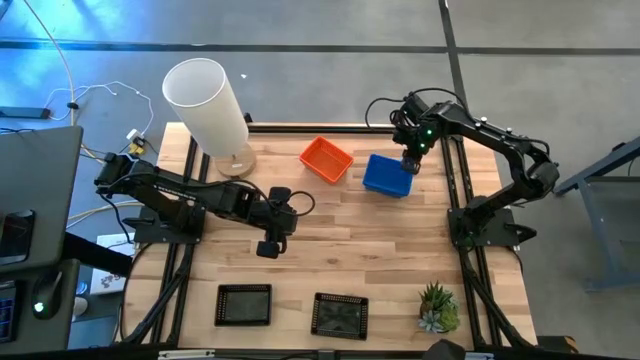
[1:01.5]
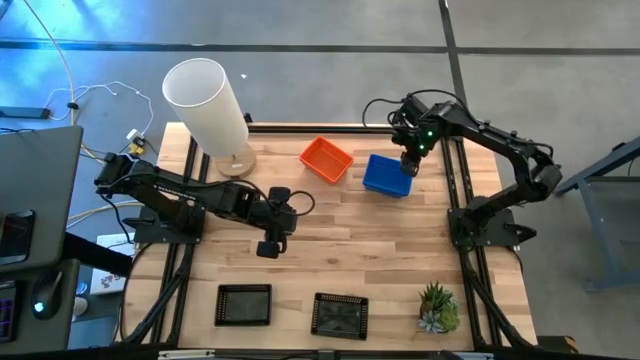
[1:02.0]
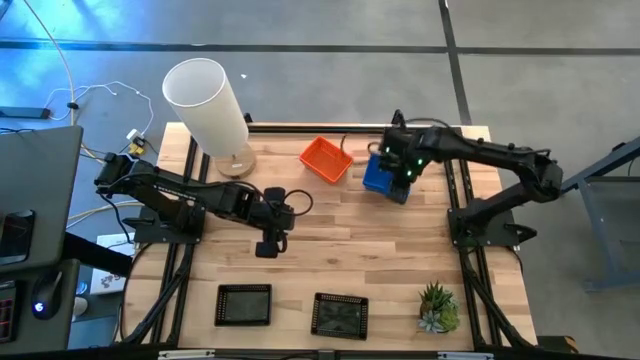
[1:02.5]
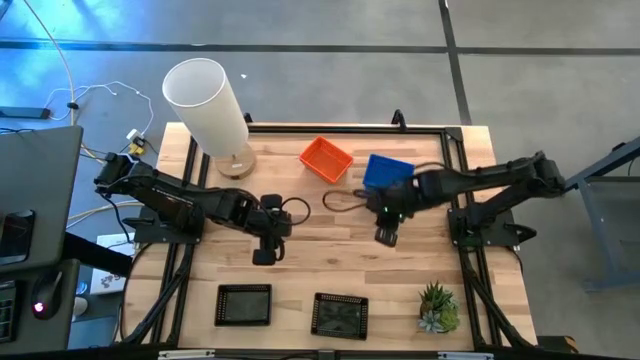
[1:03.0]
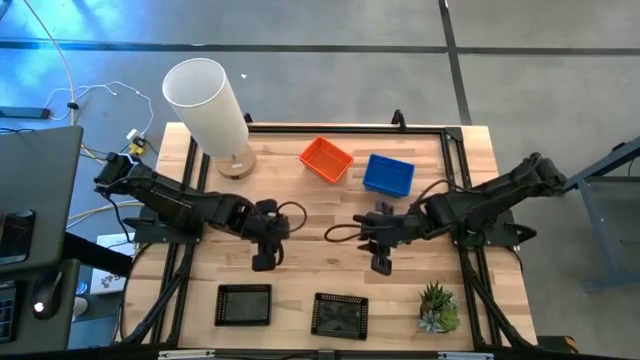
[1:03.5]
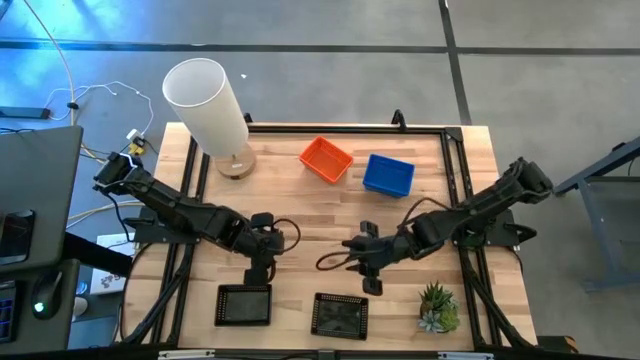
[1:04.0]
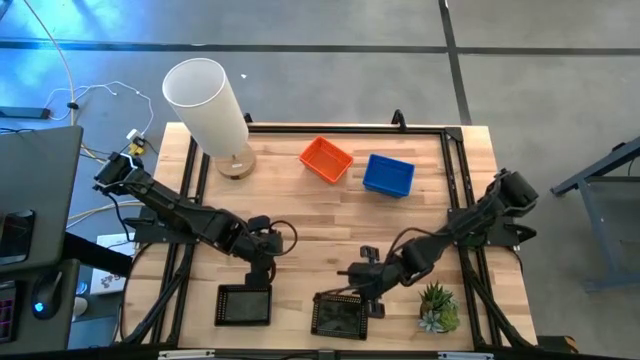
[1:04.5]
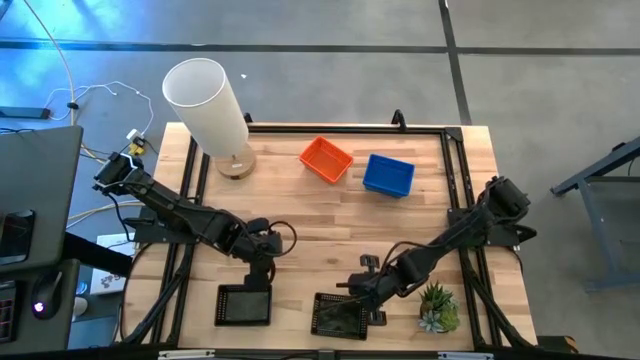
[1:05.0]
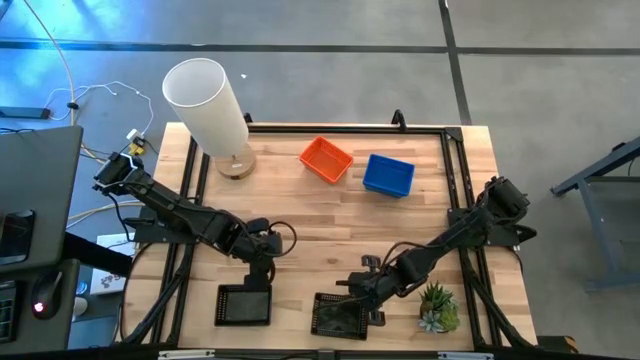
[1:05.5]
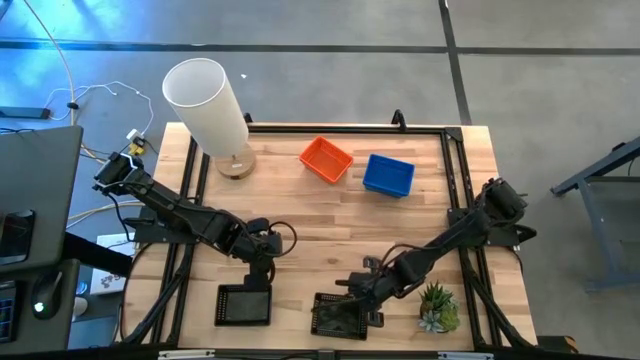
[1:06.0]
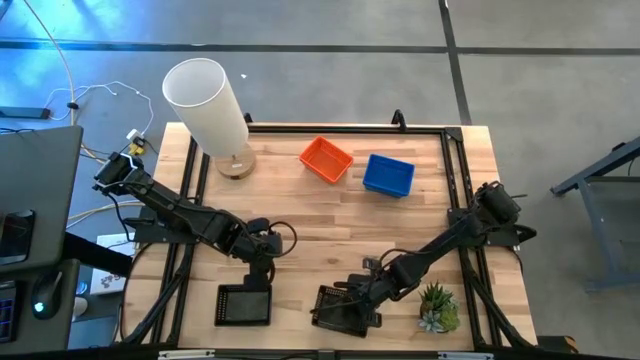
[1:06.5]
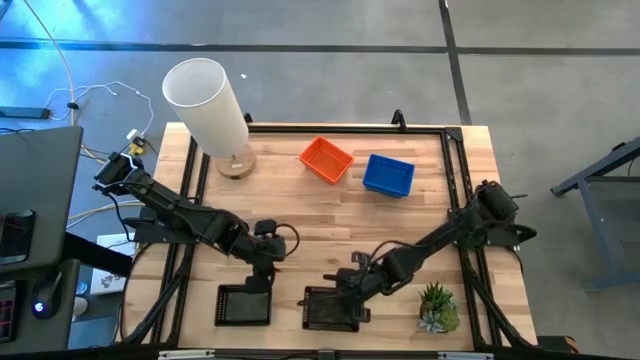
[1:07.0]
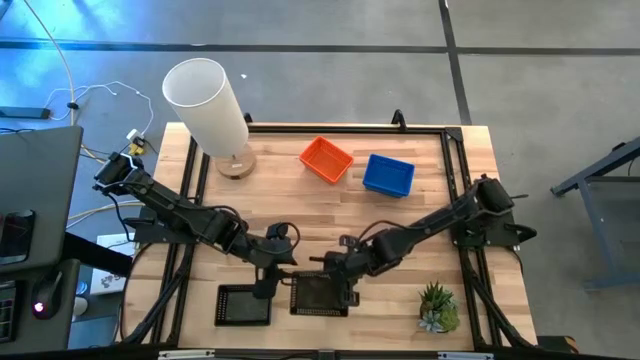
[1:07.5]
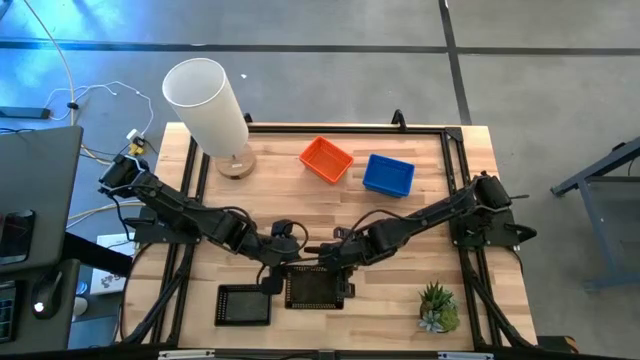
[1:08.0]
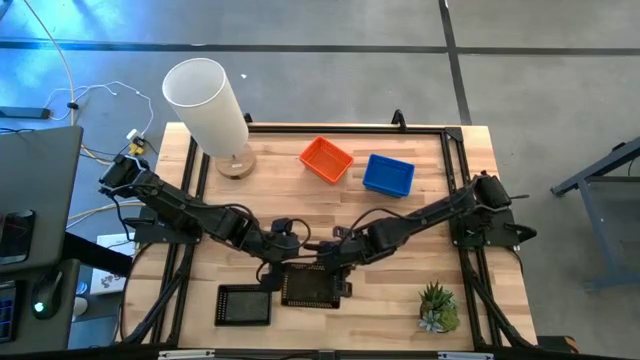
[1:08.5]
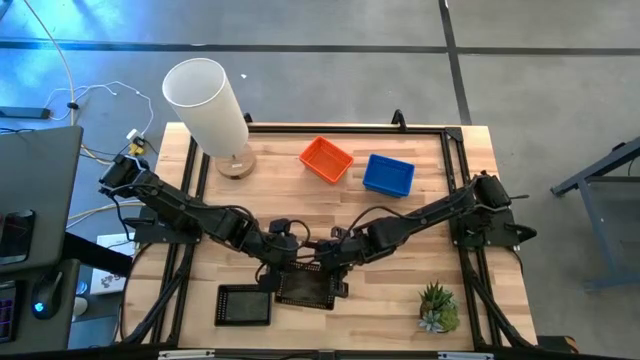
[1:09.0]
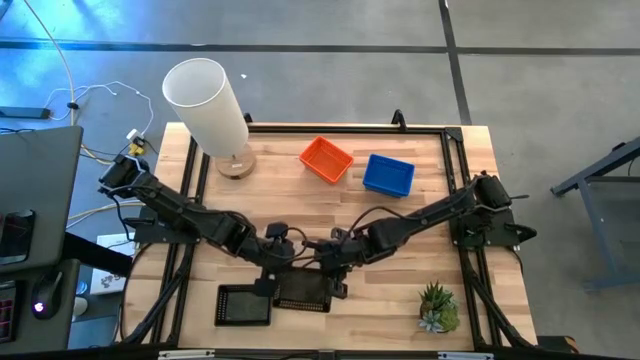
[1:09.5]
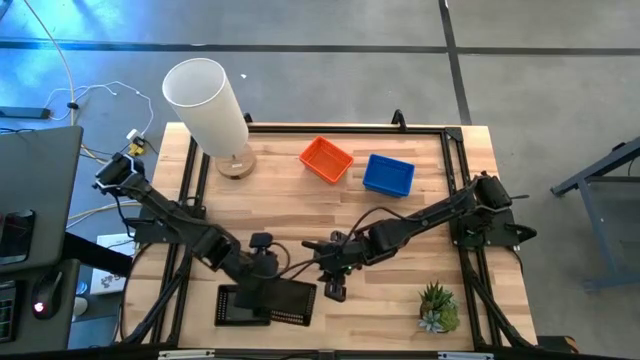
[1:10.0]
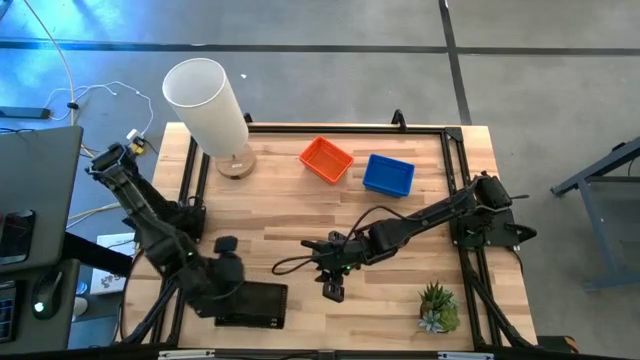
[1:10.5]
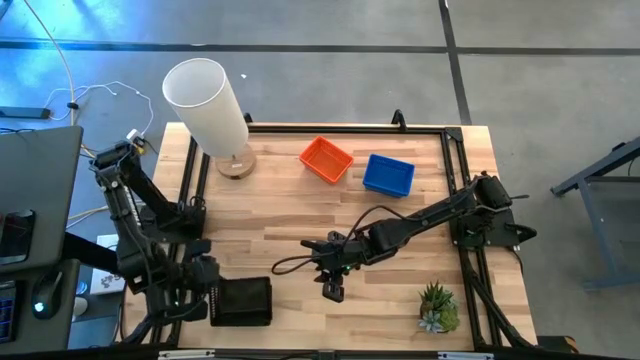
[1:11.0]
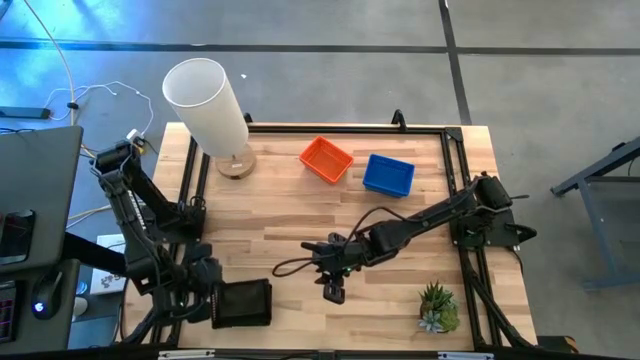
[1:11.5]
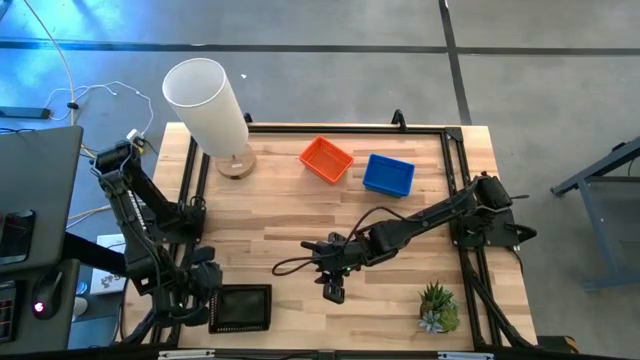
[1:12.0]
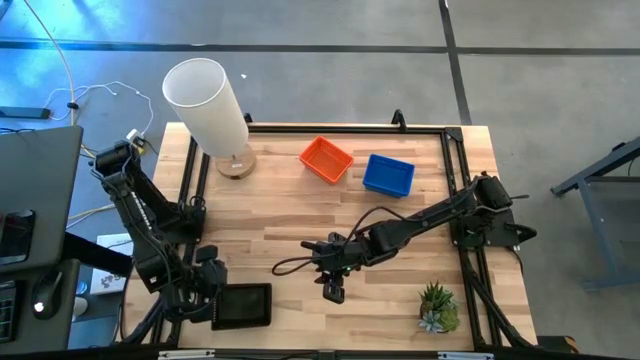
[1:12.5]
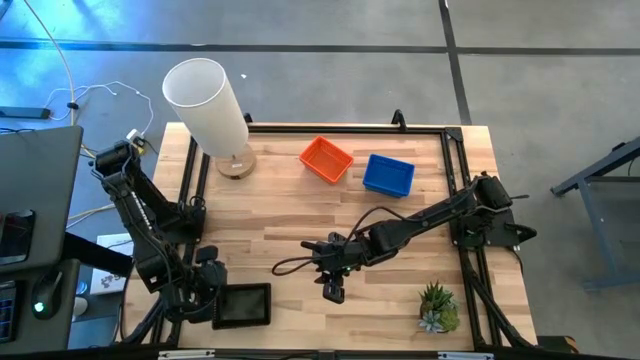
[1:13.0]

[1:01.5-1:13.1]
Stack the right black bin on top of the left black bin

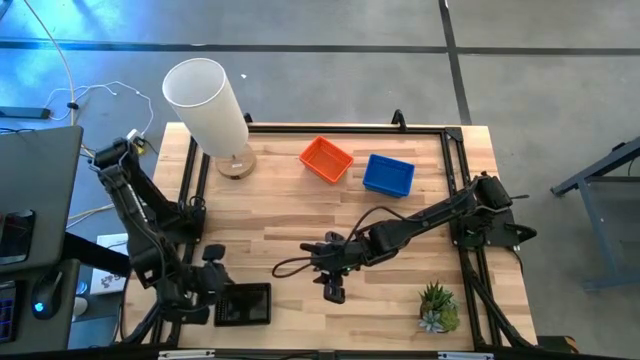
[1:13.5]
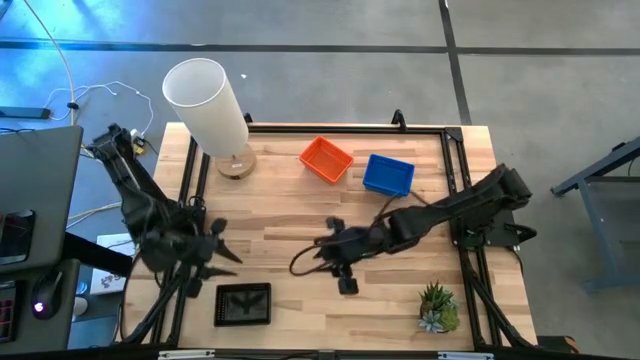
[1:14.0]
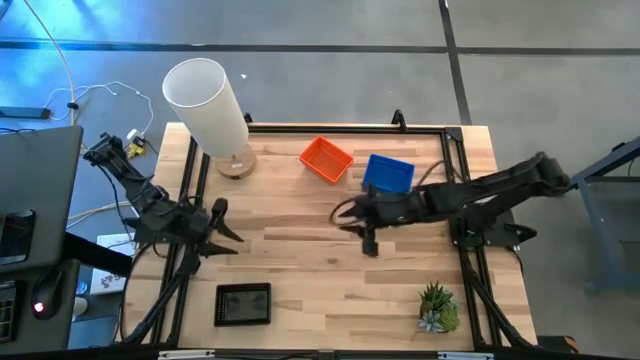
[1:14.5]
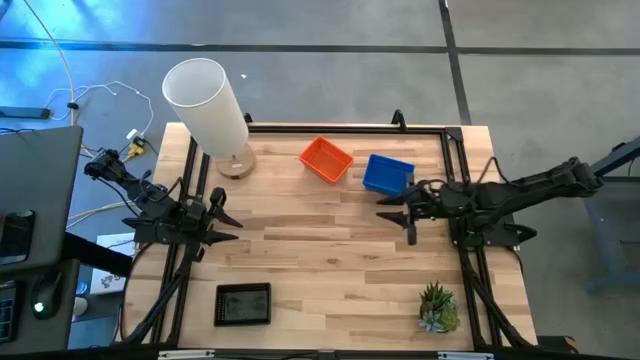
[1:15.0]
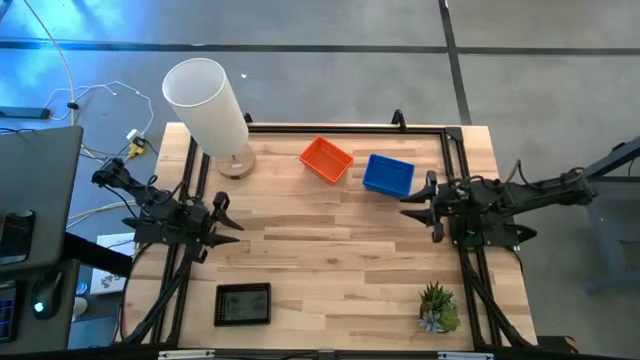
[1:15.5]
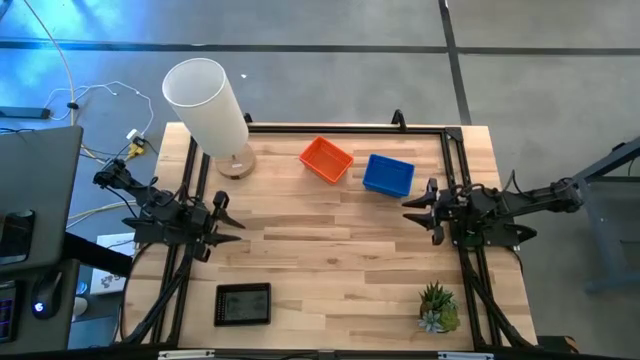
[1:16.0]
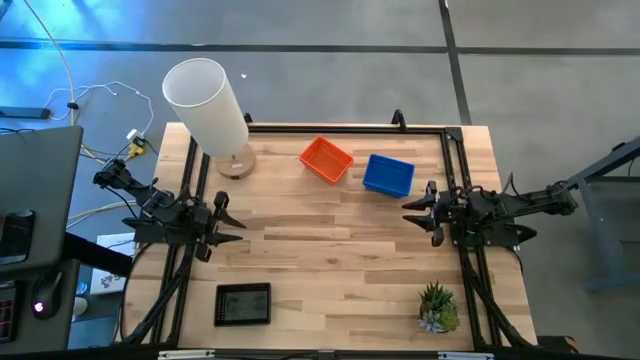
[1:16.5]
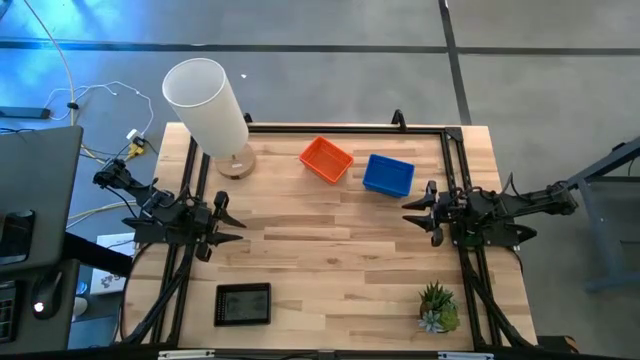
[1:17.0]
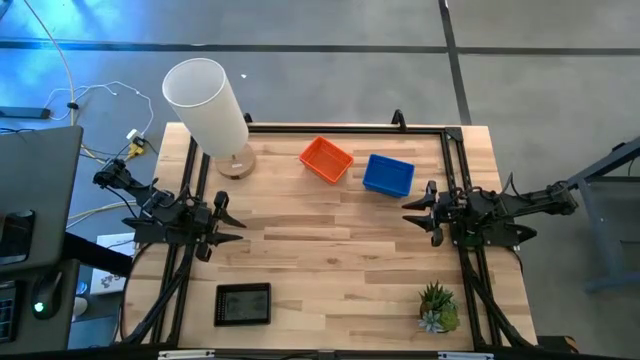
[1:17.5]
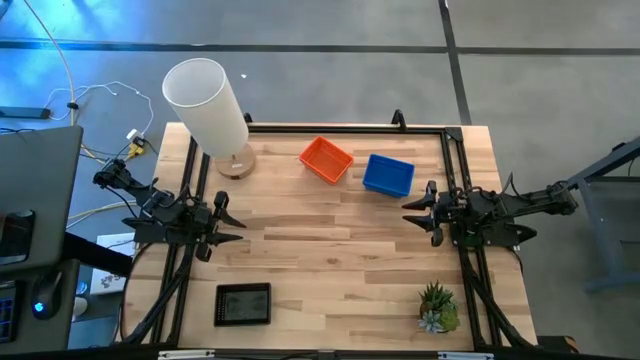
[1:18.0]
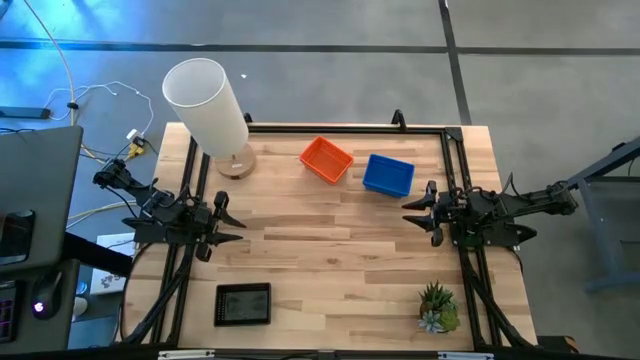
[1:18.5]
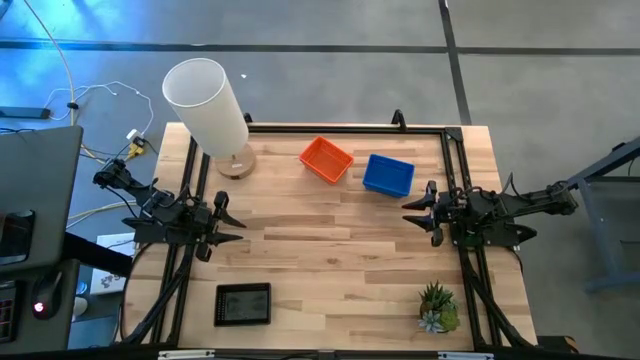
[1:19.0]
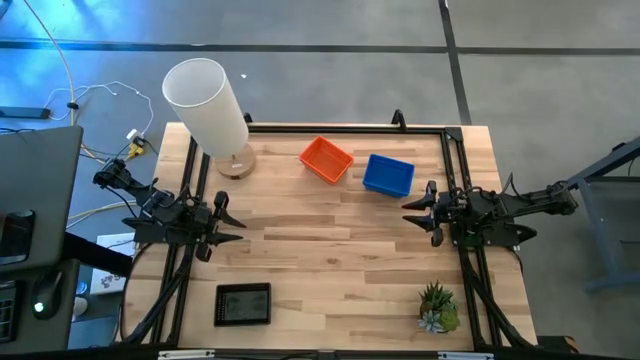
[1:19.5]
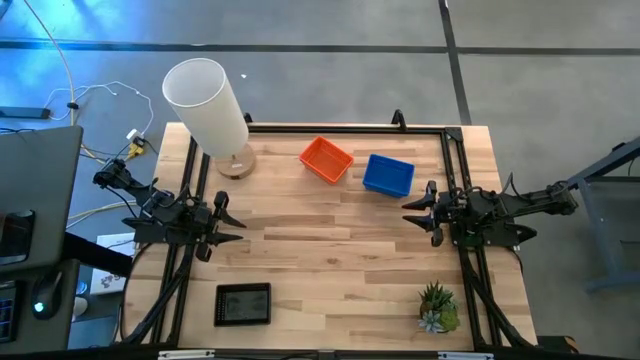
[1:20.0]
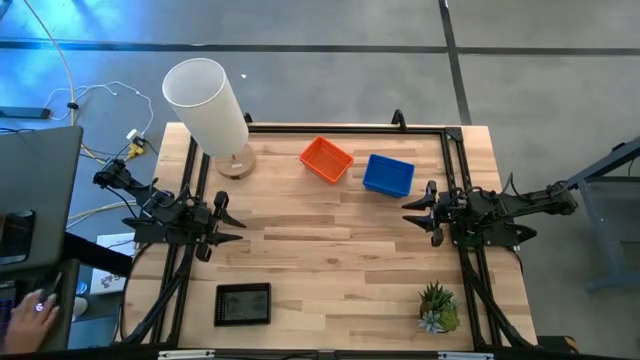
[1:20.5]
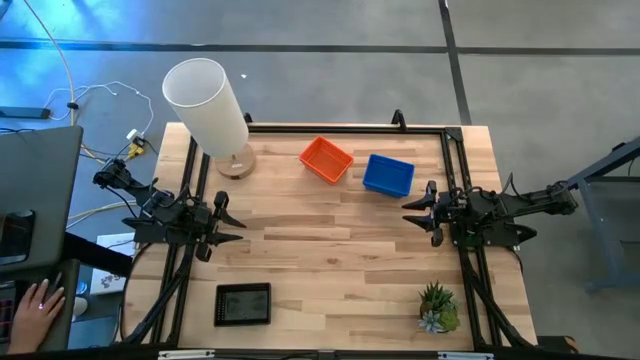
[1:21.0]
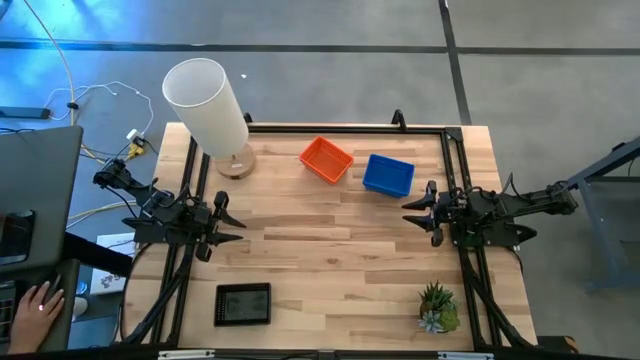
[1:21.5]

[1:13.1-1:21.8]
Return to Home Position
